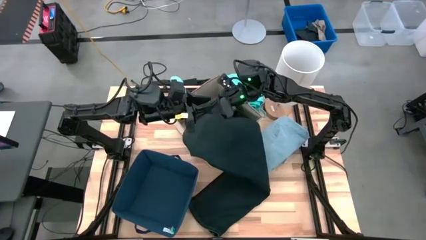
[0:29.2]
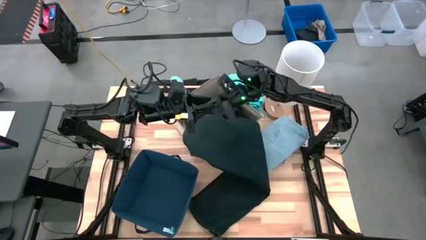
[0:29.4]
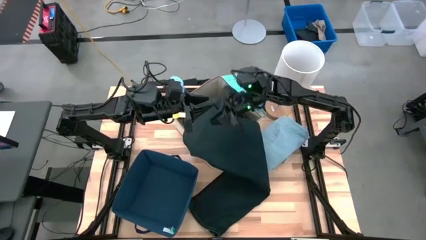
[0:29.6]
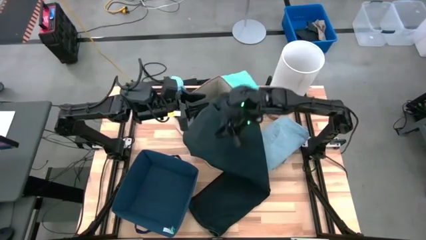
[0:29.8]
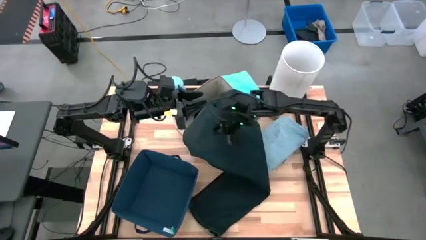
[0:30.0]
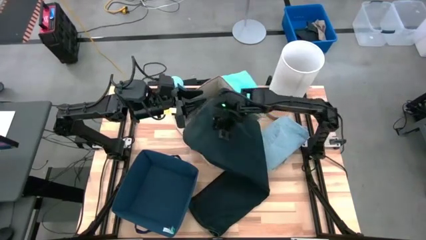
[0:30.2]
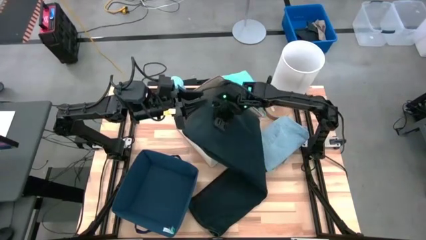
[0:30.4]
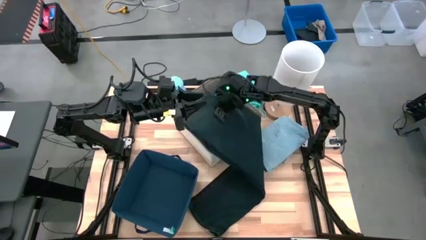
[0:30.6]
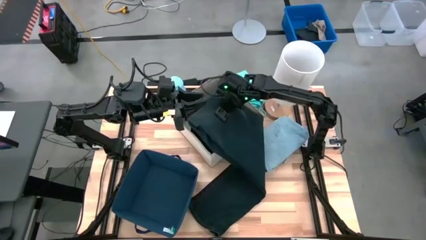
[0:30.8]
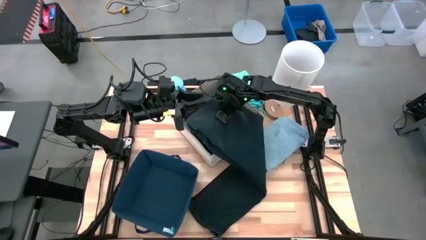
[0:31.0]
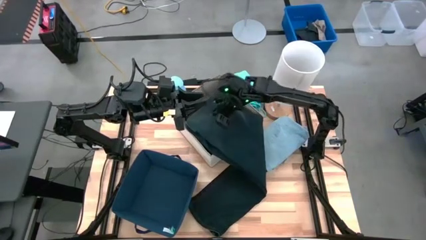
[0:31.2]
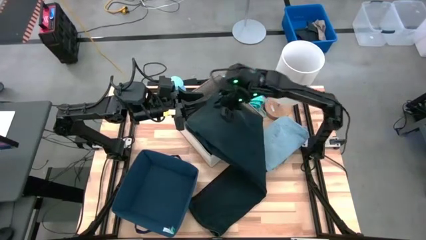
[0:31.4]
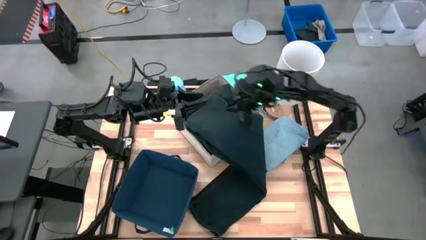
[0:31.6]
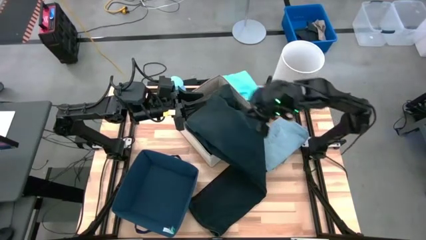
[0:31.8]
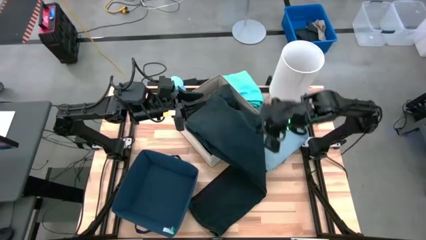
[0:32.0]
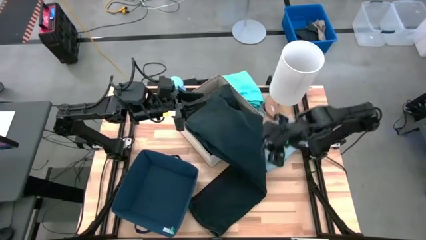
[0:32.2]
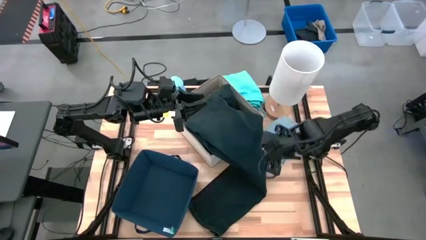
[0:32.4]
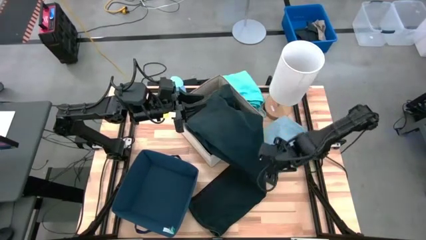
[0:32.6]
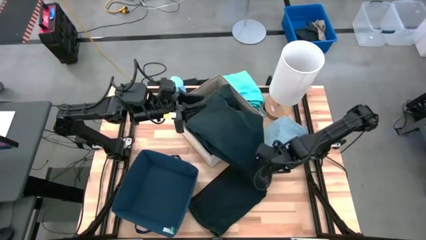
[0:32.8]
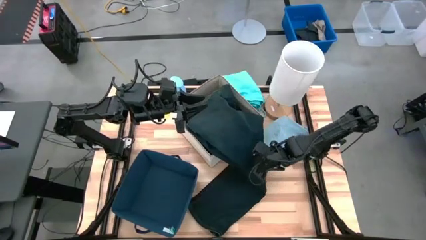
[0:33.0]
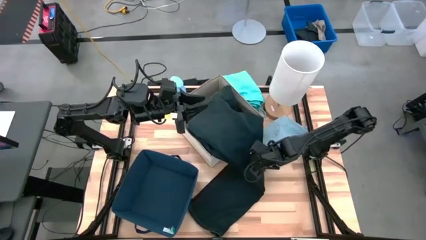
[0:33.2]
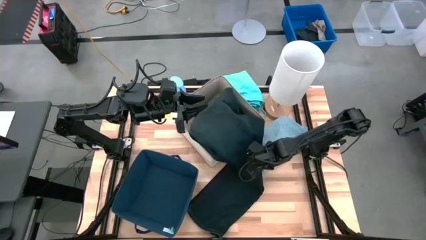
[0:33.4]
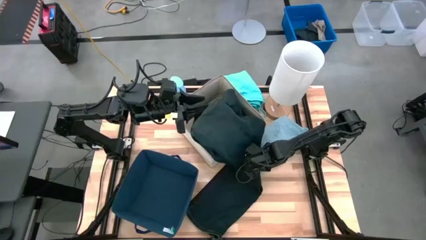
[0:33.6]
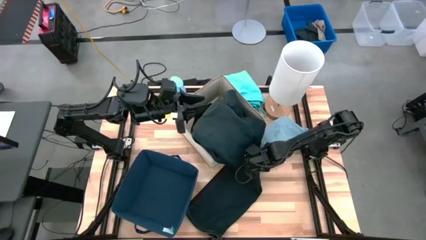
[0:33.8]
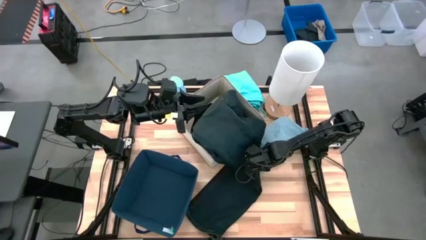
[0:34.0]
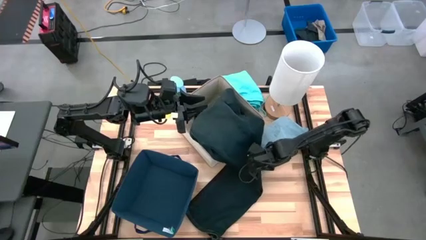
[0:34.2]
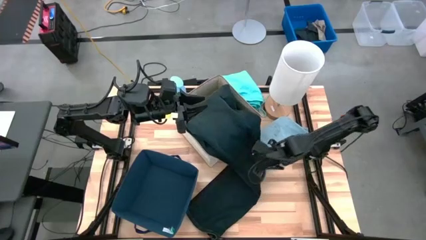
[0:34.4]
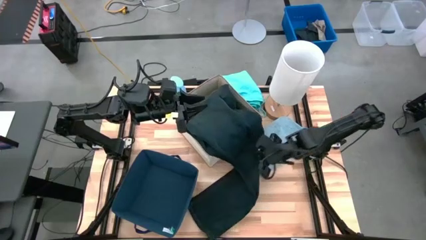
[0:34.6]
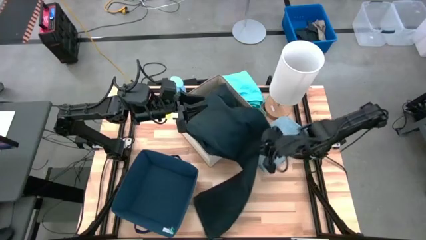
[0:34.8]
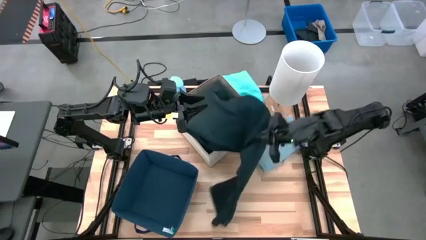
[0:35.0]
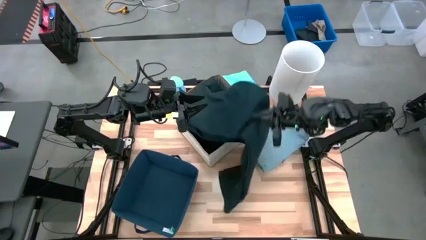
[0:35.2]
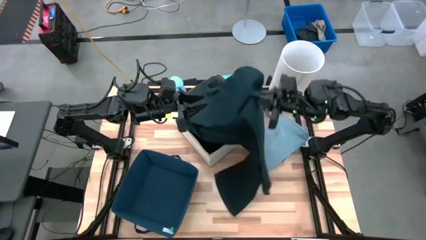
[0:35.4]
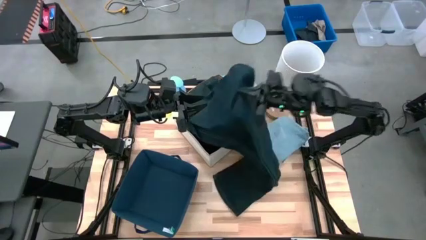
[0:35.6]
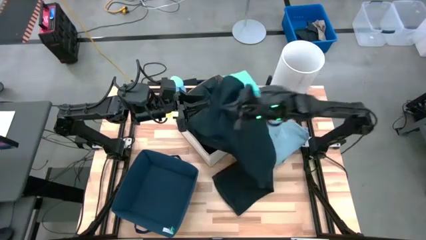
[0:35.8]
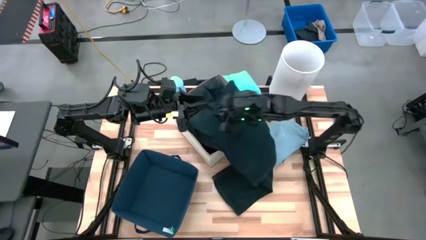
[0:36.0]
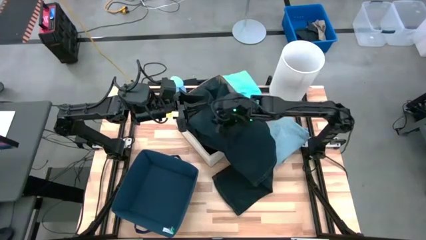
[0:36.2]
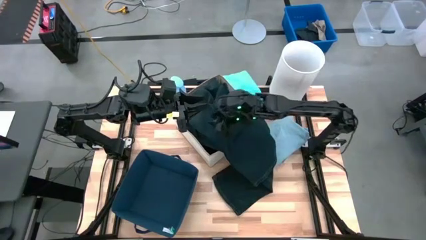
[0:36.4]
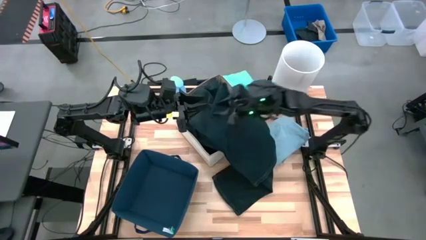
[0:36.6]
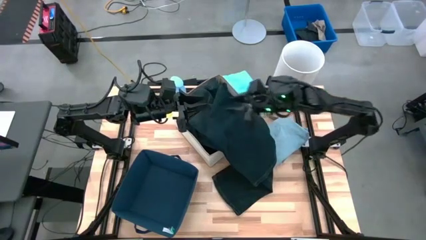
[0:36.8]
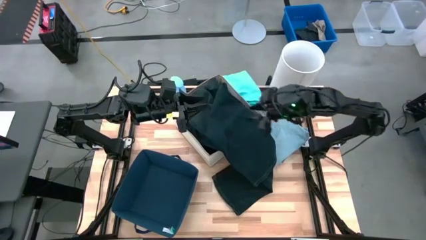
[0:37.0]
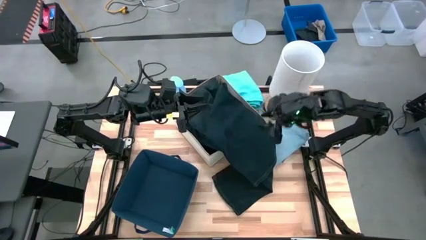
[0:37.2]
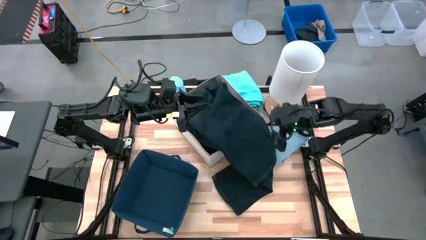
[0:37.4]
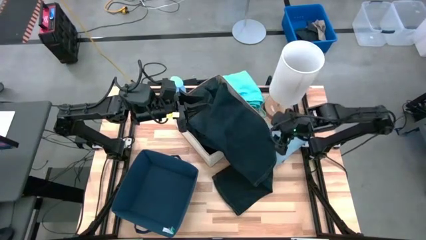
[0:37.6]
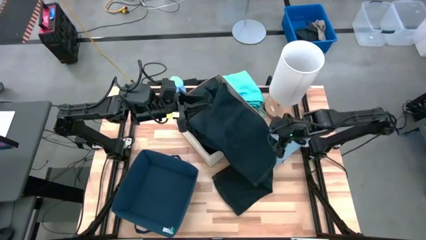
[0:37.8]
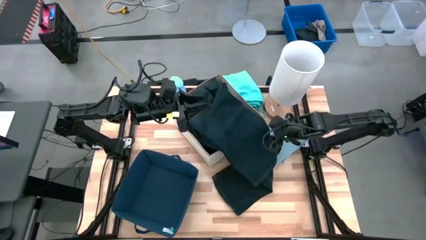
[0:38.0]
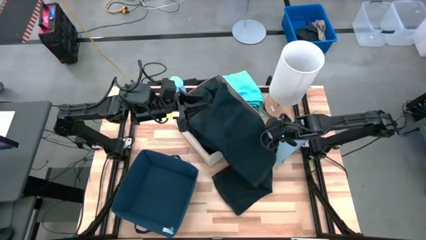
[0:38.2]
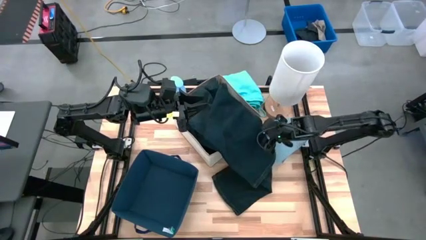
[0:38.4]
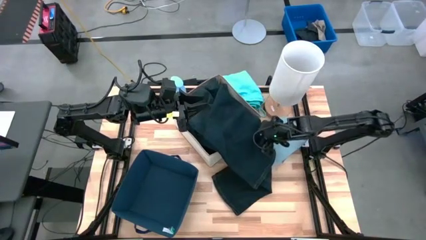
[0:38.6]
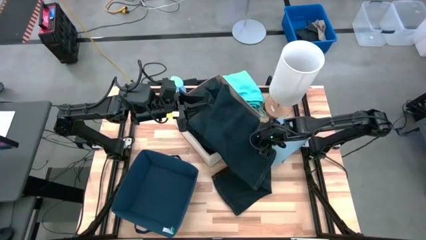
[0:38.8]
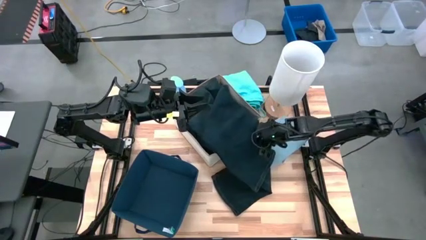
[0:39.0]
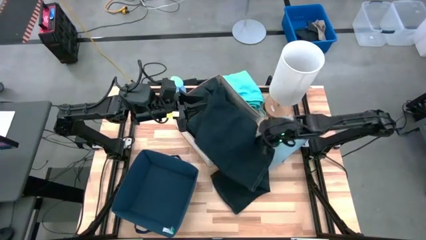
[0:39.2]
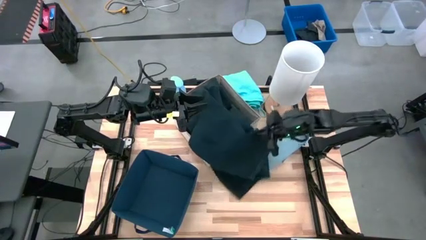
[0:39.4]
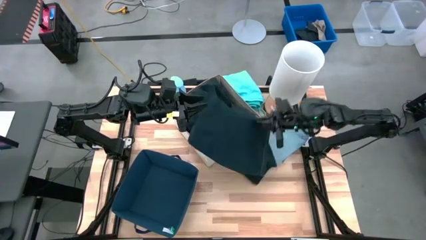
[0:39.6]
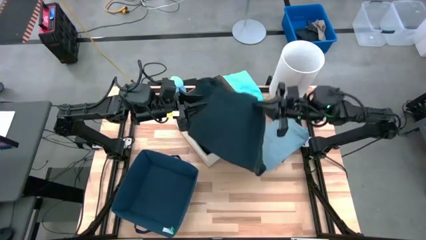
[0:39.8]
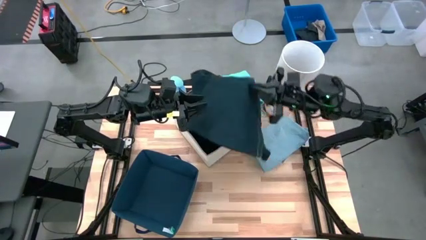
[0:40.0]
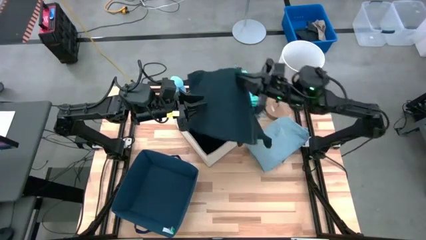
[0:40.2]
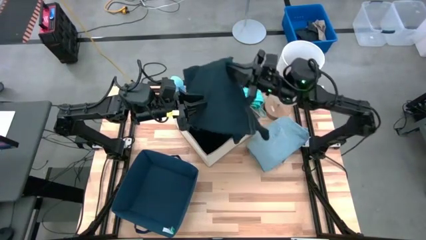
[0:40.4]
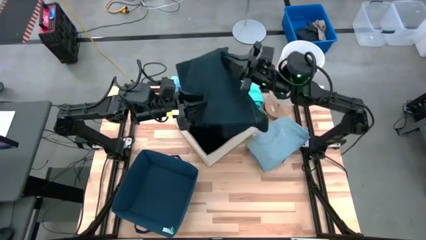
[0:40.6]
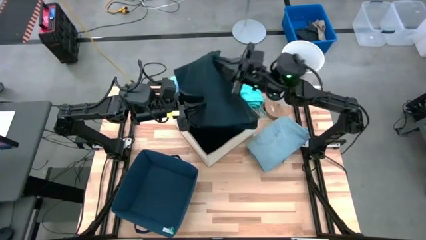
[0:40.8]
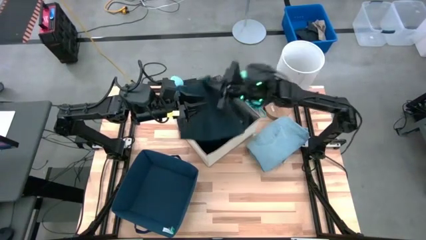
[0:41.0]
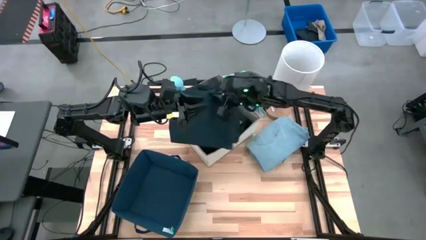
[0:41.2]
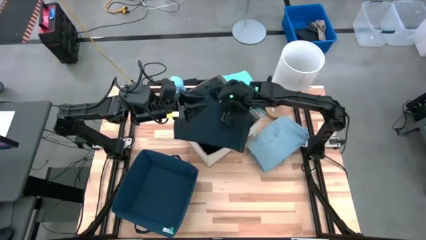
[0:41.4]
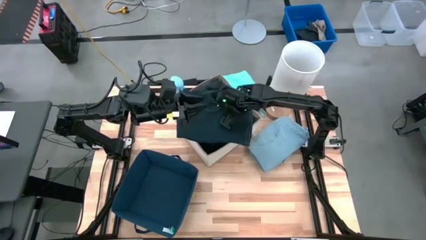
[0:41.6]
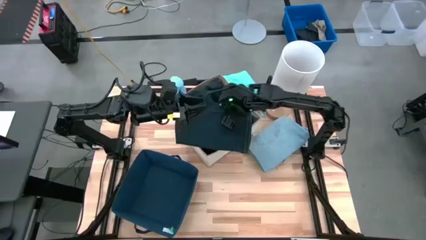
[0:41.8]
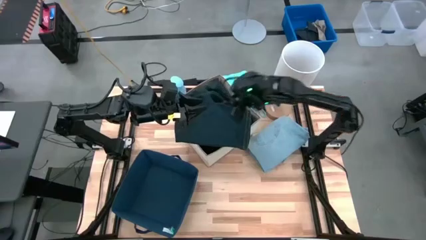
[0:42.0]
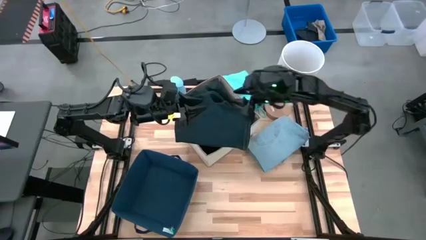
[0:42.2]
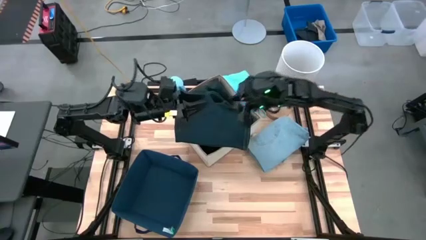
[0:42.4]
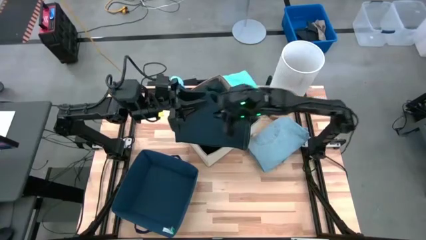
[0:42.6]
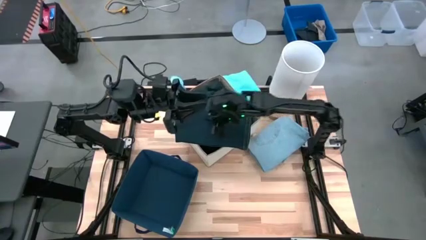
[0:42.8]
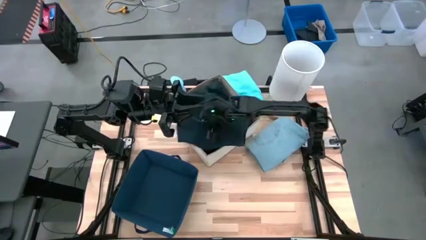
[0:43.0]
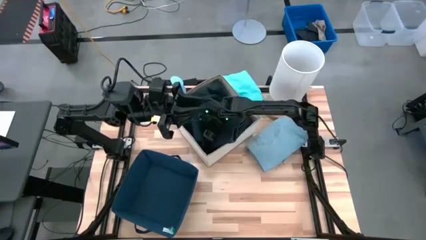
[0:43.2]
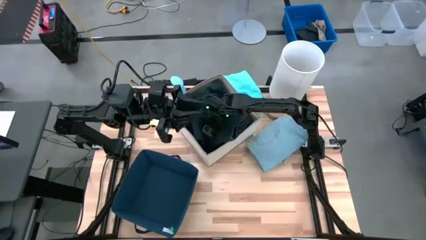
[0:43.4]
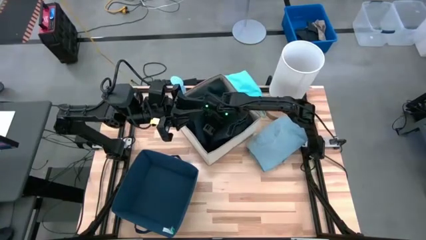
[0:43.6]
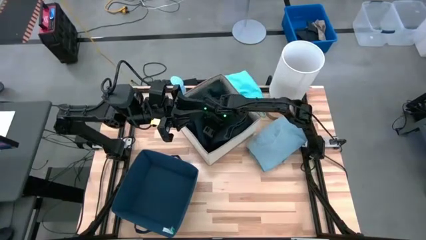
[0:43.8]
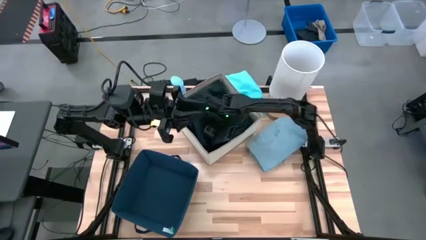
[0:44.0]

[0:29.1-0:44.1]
Task: Sort clothes
Put the blue pants into the white laundry organizer
